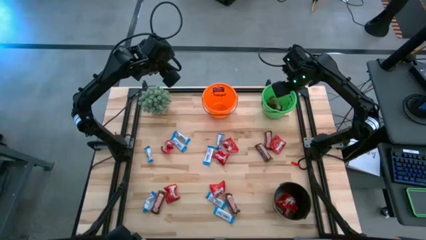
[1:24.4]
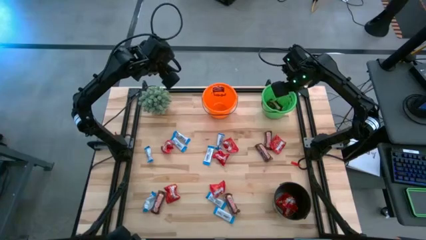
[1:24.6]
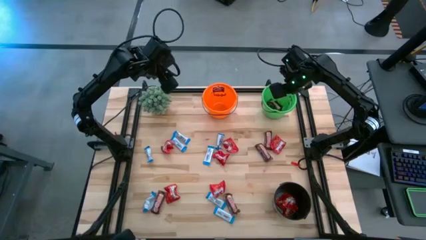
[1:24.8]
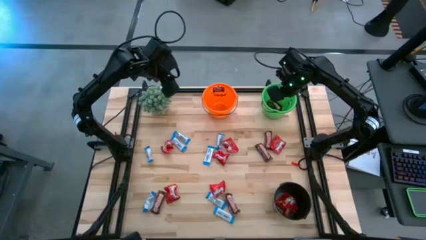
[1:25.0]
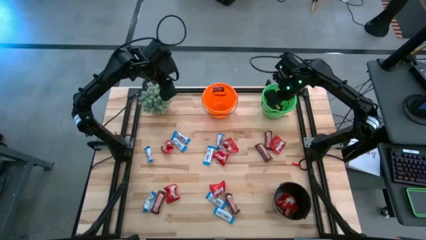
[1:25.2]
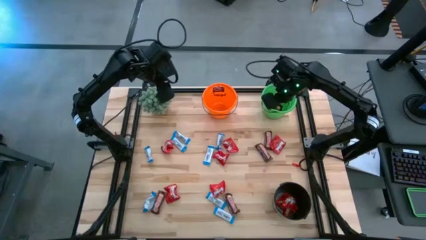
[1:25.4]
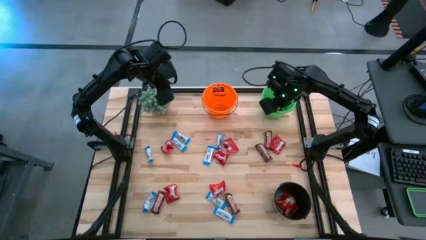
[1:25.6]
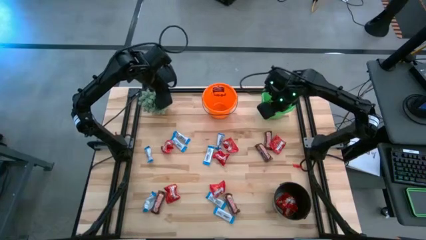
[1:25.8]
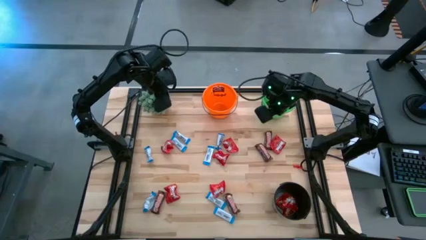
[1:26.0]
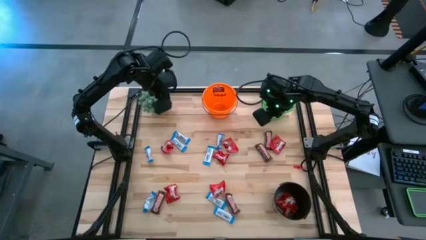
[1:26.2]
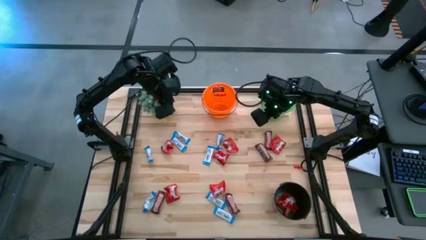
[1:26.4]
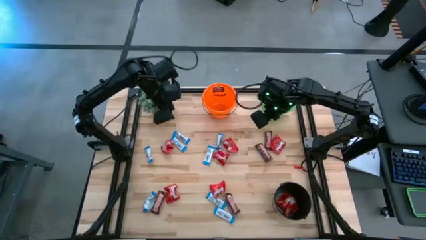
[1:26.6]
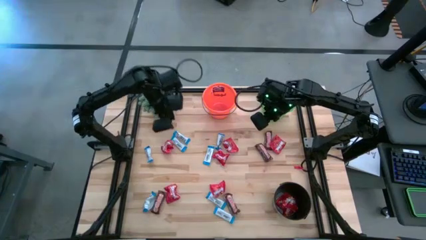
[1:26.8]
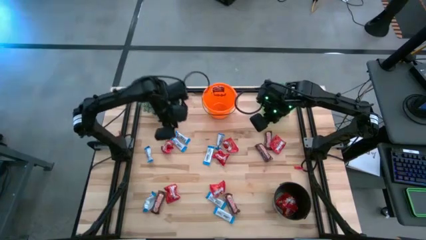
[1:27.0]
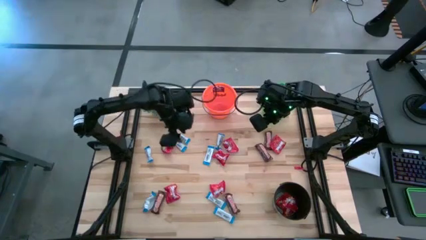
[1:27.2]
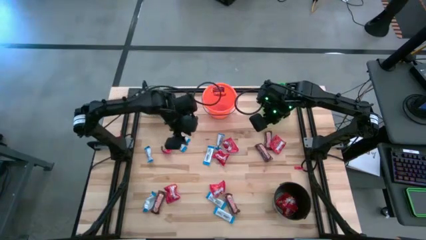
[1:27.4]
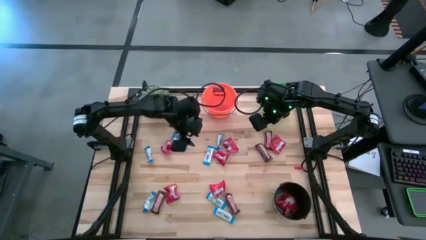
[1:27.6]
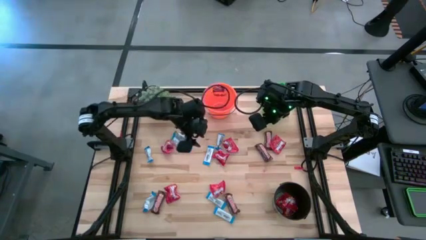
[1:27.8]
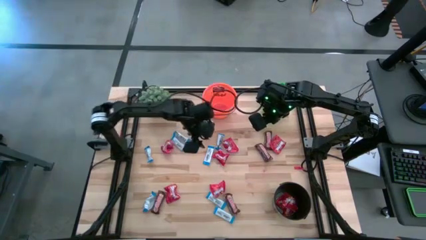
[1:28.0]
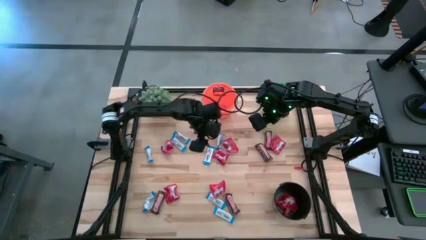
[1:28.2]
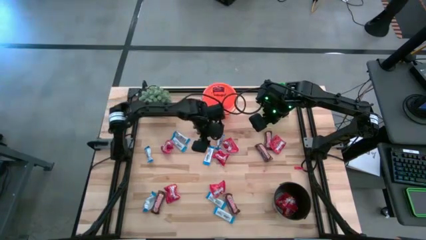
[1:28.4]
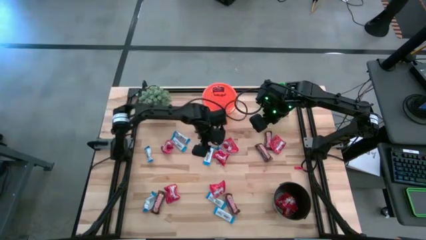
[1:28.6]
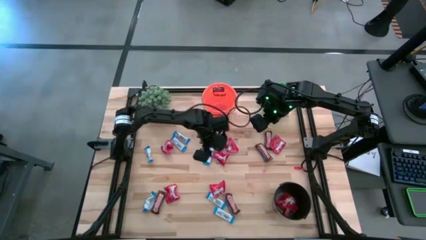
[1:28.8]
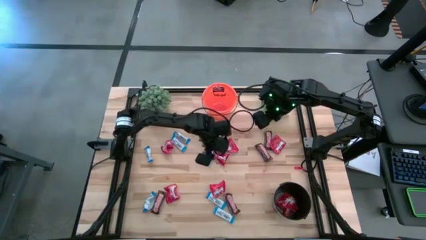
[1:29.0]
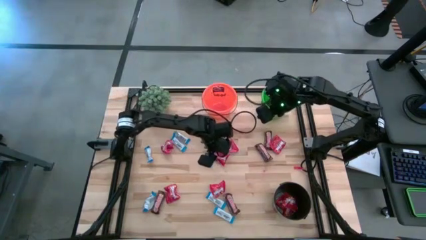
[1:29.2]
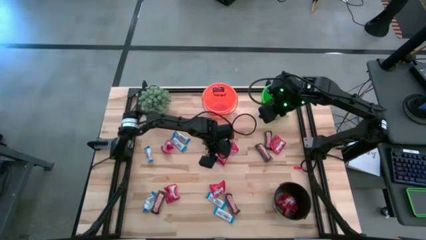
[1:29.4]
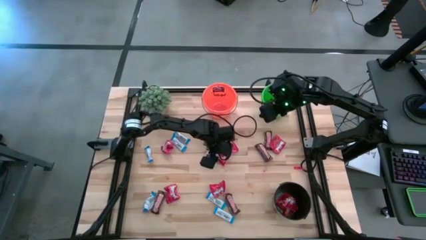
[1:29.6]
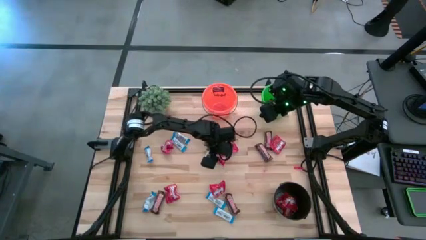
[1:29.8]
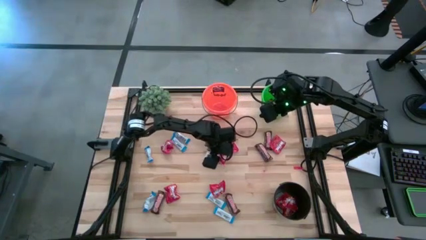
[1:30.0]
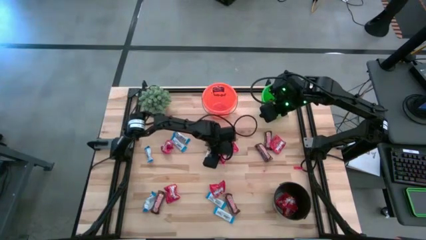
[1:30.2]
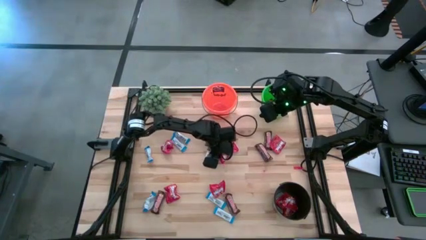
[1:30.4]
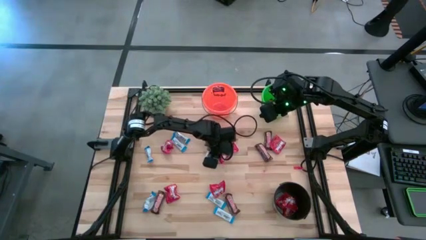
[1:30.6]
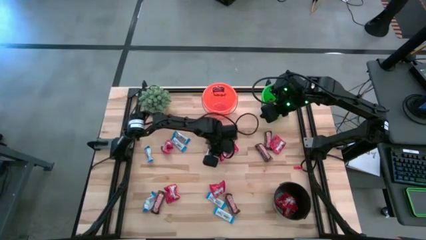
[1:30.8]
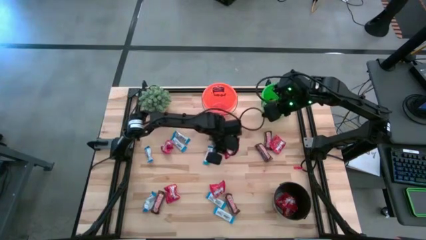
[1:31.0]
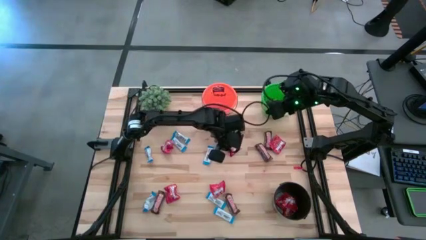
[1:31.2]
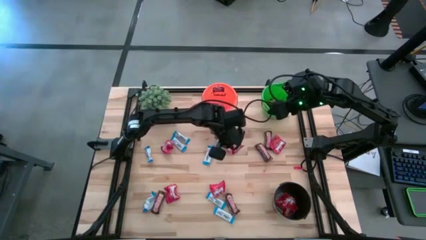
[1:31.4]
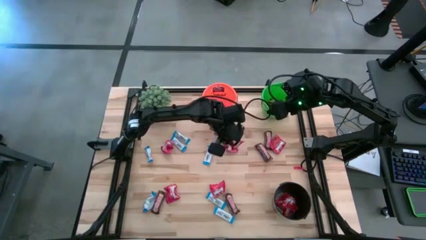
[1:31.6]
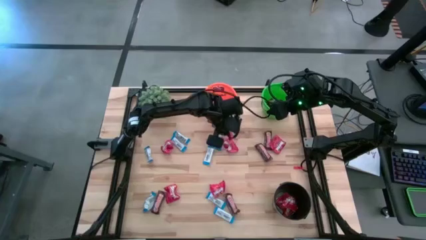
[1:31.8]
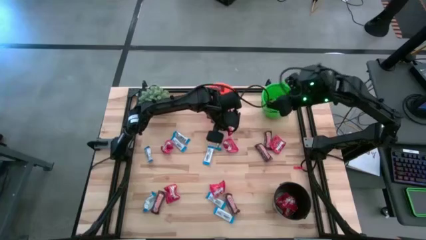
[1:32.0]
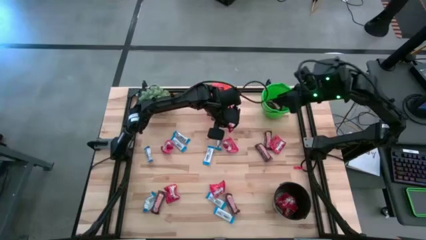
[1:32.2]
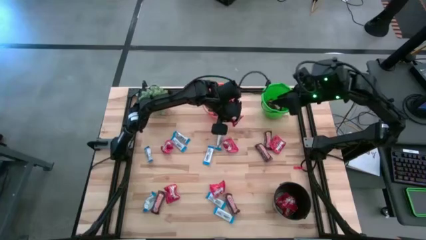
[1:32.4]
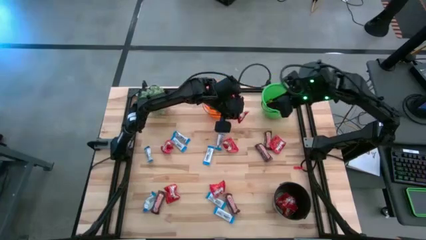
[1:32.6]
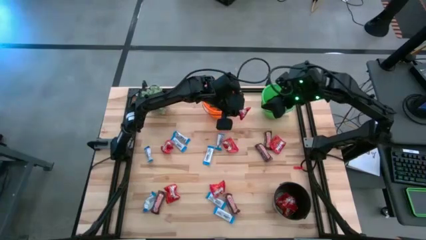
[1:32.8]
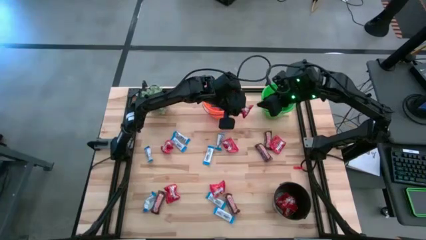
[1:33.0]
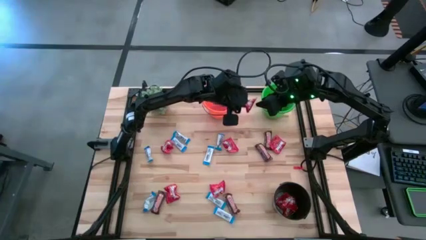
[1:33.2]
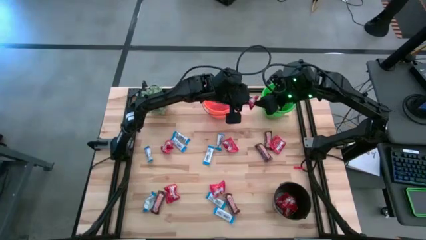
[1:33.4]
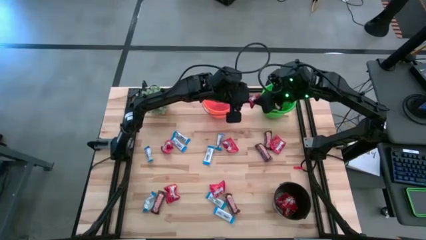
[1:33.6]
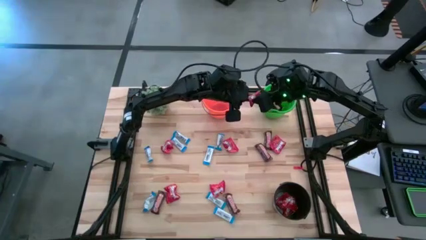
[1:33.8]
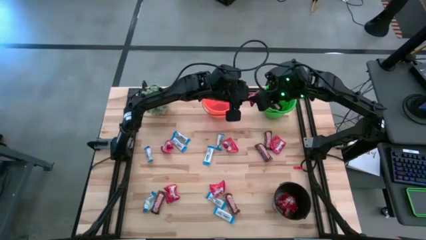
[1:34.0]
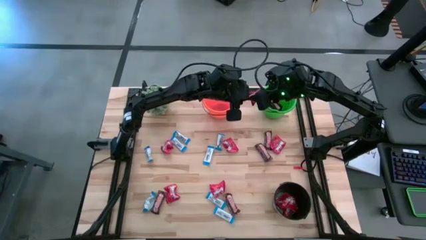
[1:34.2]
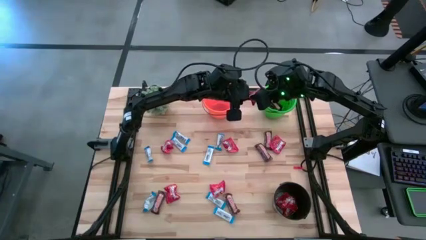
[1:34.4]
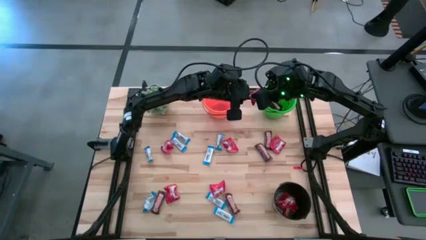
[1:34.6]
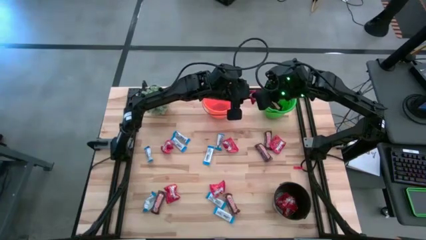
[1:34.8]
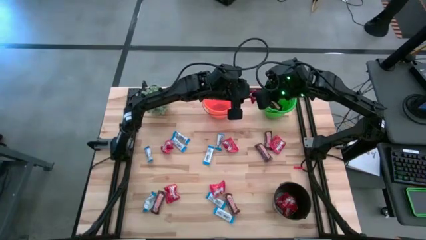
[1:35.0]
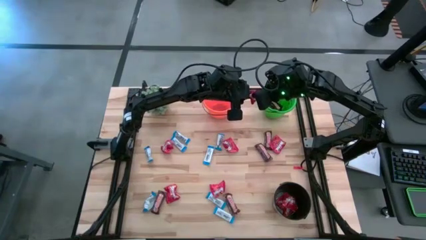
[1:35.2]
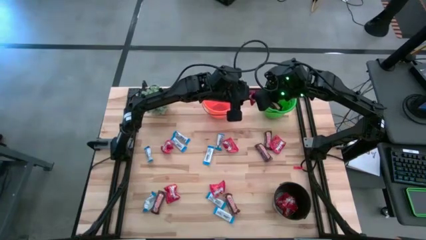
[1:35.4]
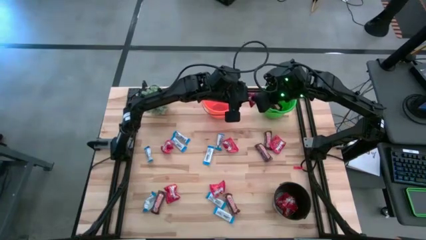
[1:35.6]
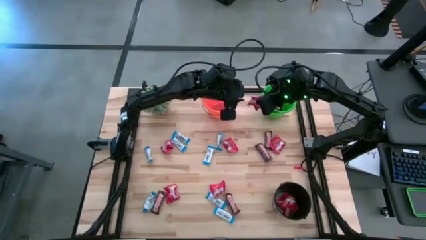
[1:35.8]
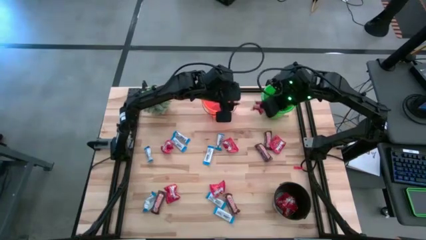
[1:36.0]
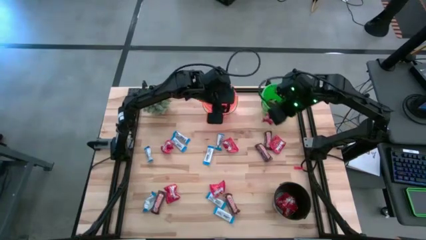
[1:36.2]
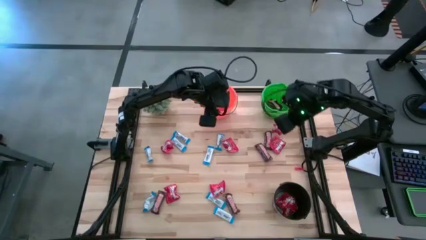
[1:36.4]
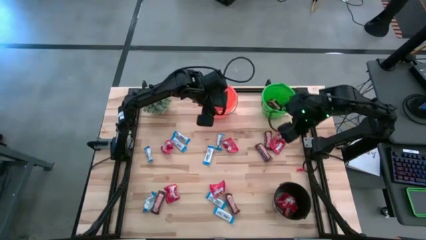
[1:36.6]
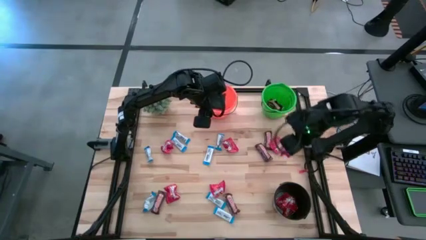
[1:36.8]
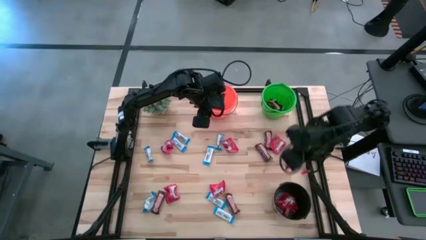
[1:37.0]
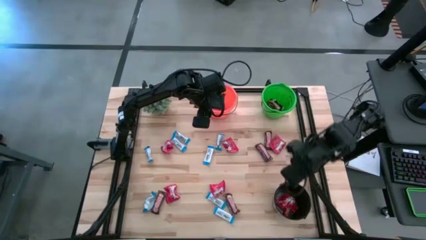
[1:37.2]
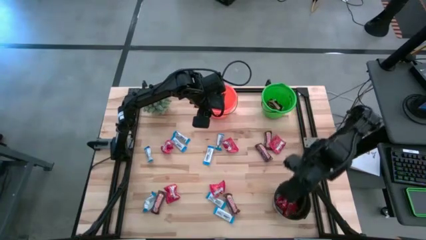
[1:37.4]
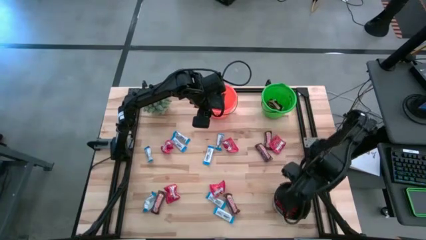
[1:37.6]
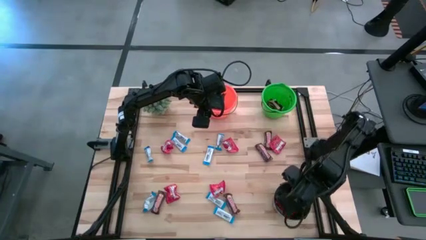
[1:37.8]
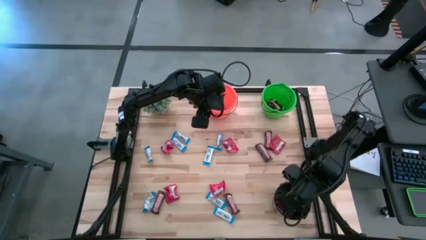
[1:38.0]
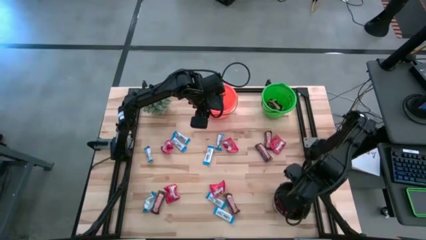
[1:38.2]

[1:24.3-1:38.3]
Task: Organize candy in baskets
Put the red chocolate into the black bucket

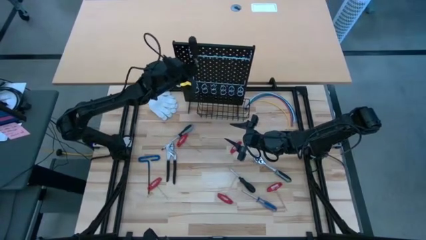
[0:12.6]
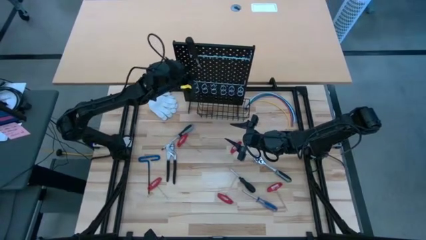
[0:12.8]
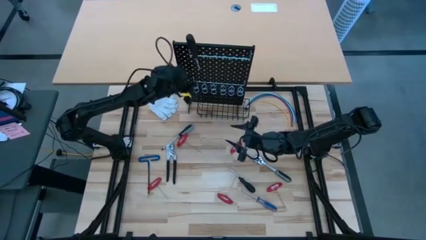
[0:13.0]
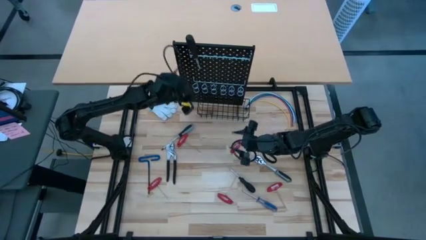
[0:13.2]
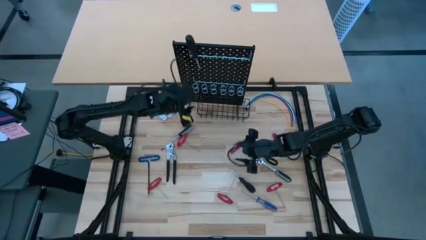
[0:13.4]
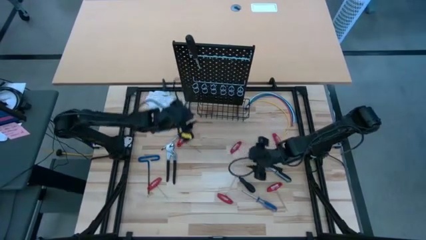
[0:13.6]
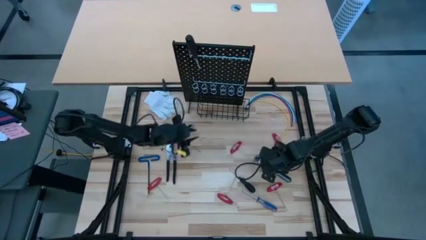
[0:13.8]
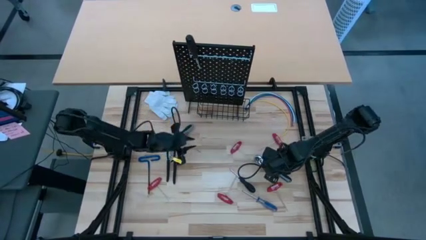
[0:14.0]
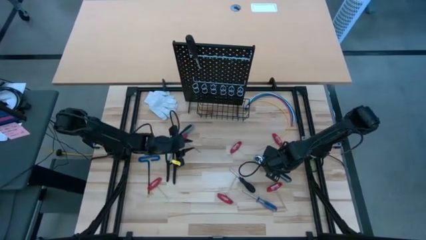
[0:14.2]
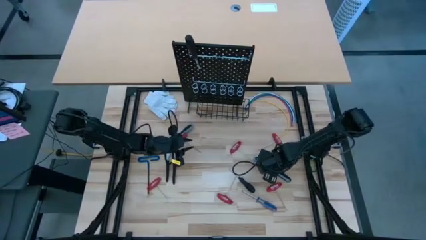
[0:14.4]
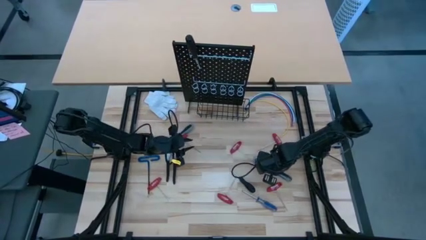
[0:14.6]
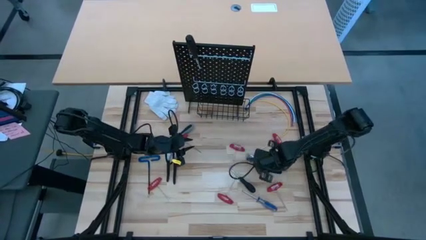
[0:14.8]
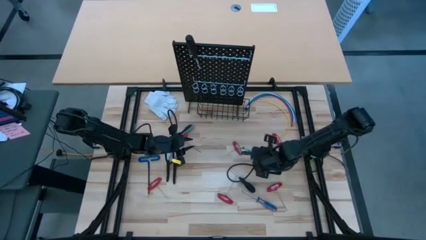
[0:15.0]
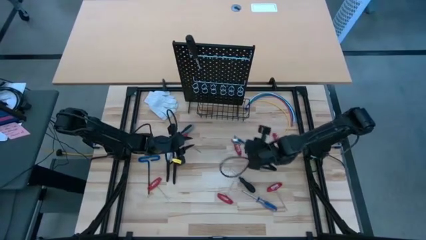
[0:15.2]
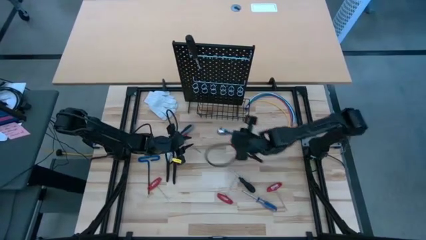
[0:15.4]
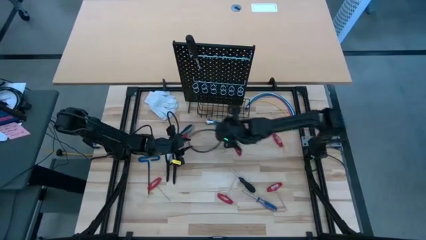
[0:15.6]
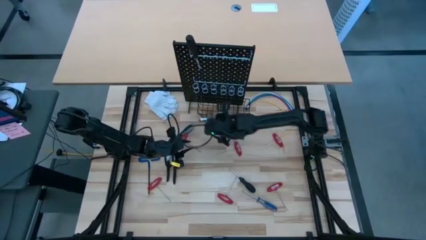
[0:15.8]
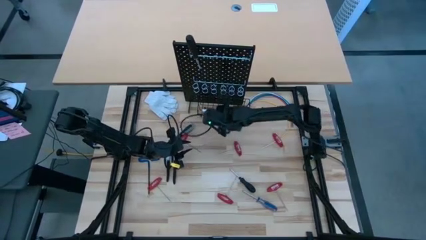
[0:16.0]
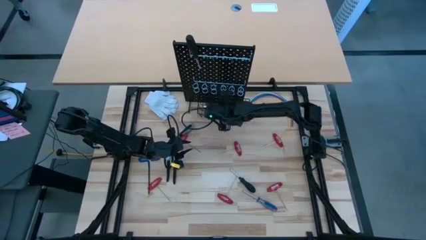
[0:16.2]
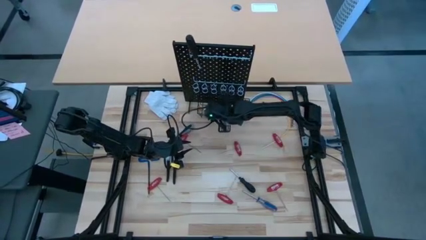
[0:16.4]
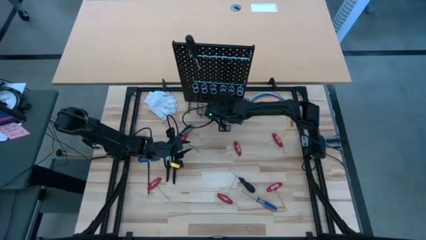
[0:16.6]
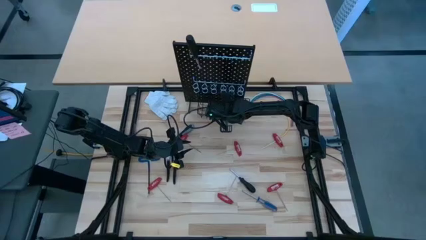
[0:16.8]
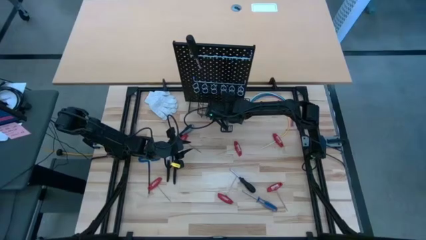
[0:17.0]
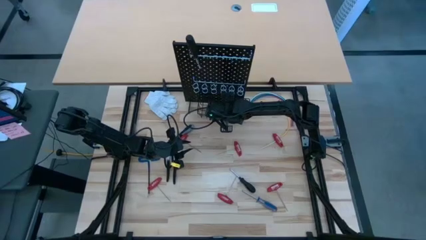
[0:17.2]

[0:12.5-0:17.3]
Task: Hang tools onto peg board
Put the black ratchet wrench in the mesh basket on the pegboard
